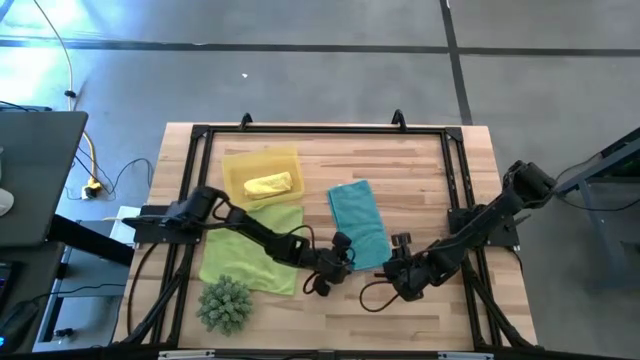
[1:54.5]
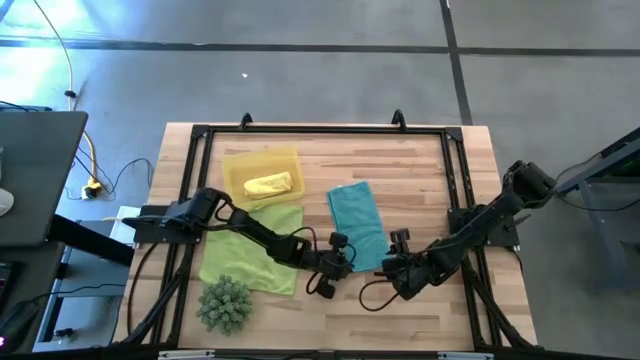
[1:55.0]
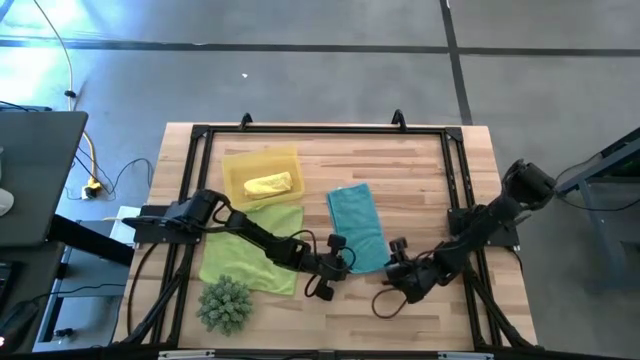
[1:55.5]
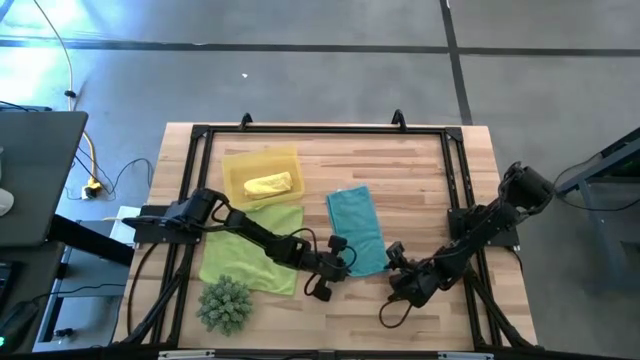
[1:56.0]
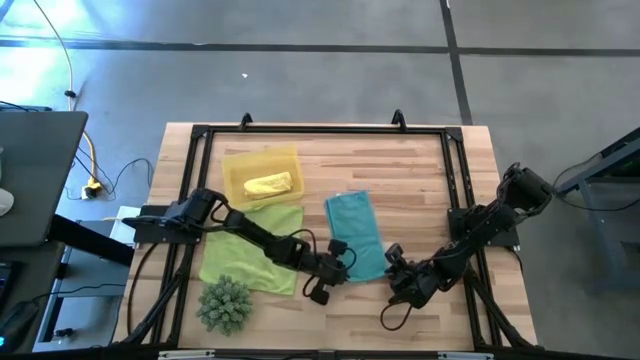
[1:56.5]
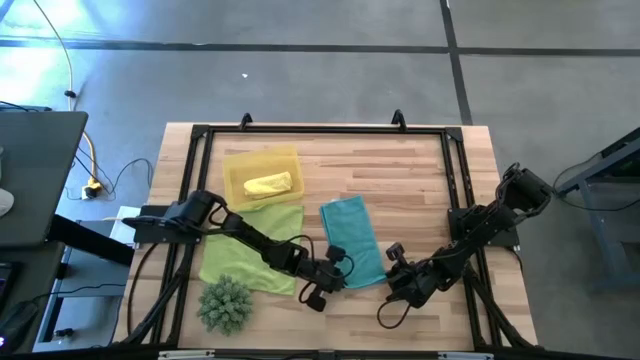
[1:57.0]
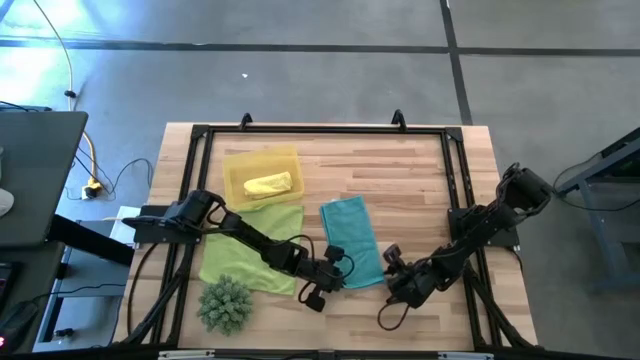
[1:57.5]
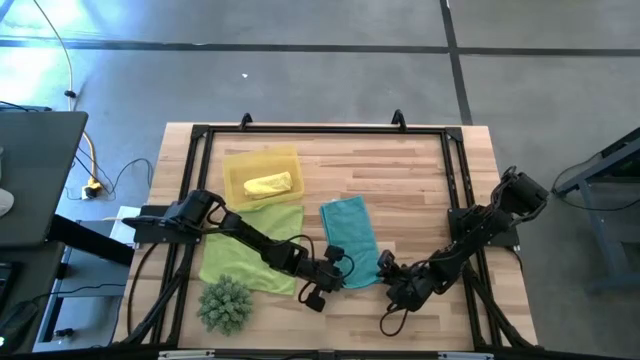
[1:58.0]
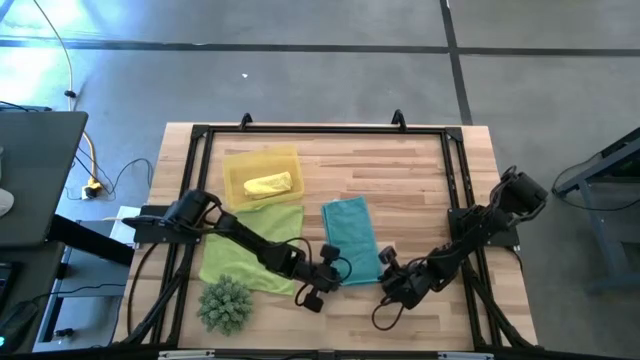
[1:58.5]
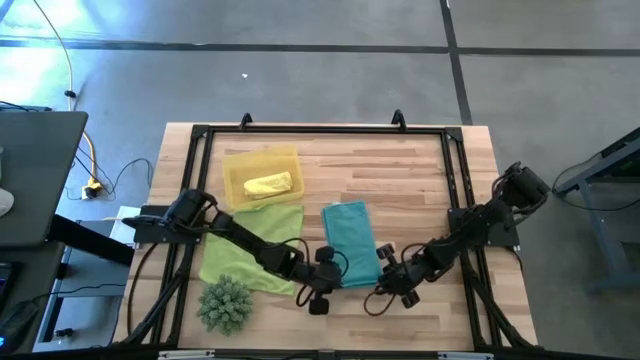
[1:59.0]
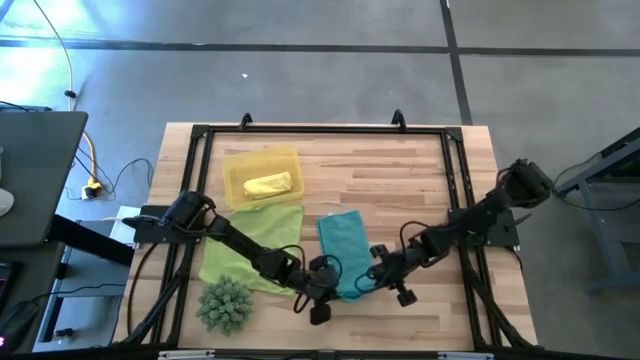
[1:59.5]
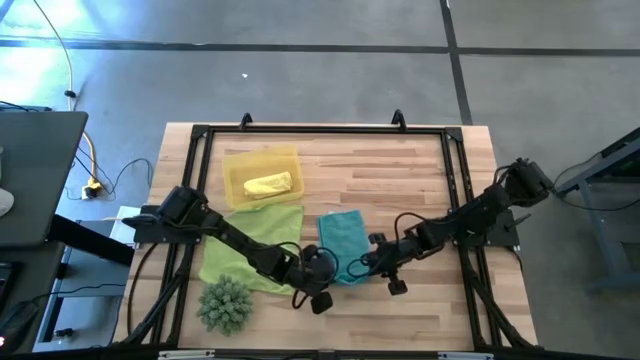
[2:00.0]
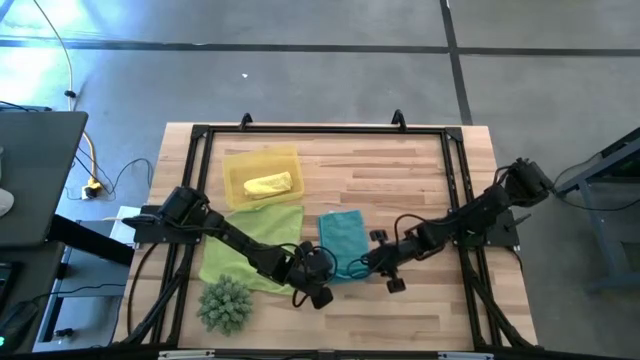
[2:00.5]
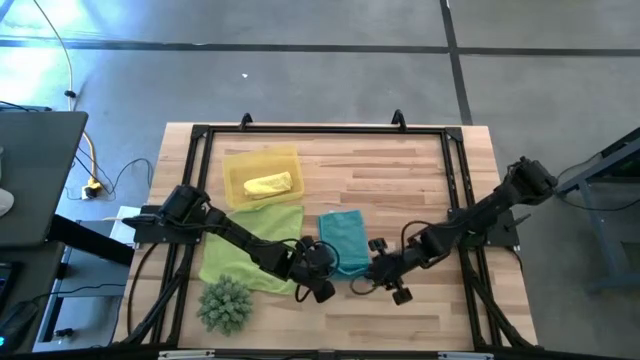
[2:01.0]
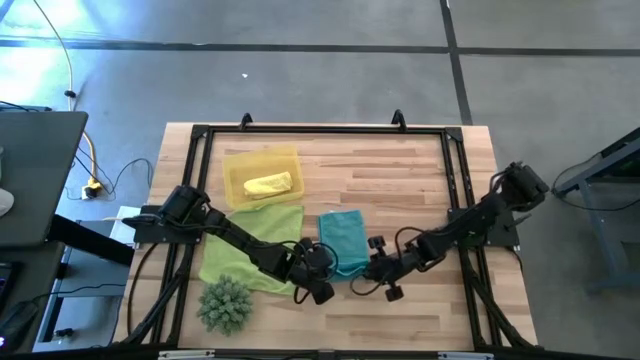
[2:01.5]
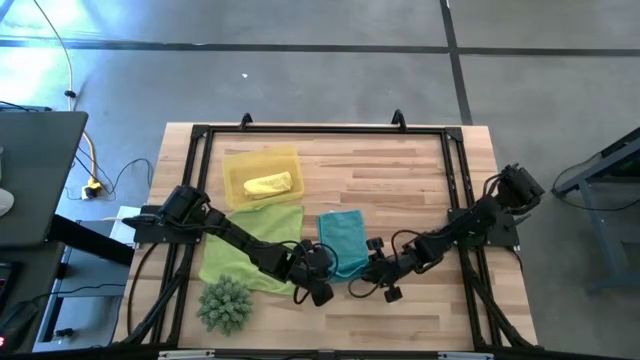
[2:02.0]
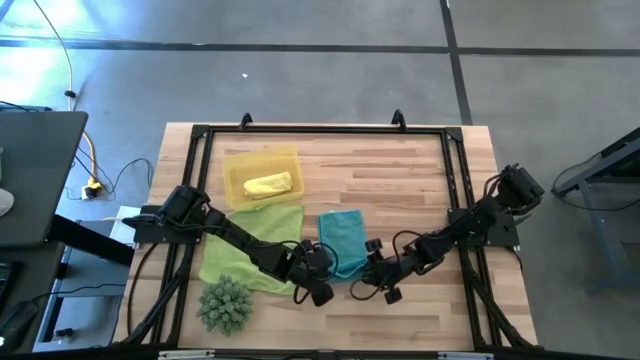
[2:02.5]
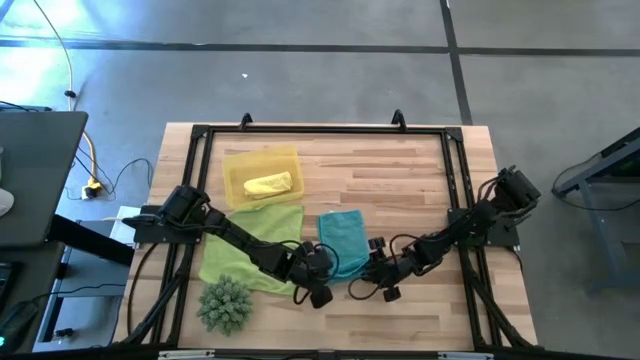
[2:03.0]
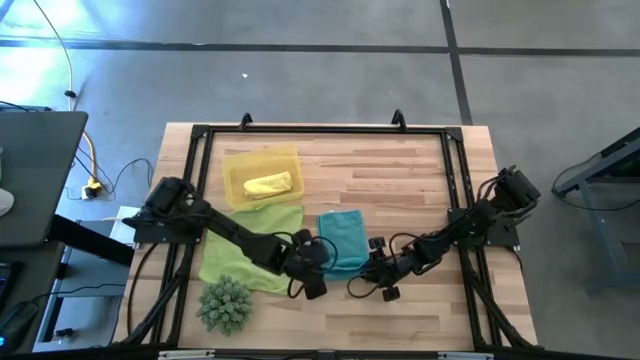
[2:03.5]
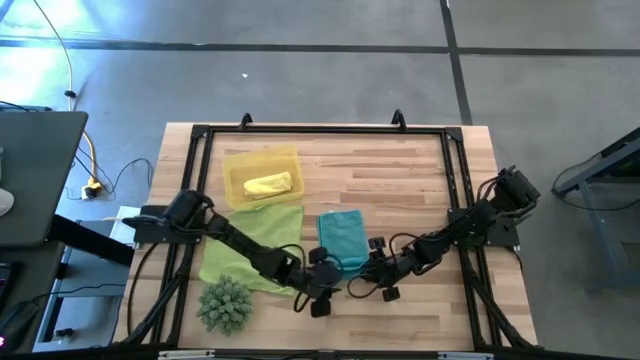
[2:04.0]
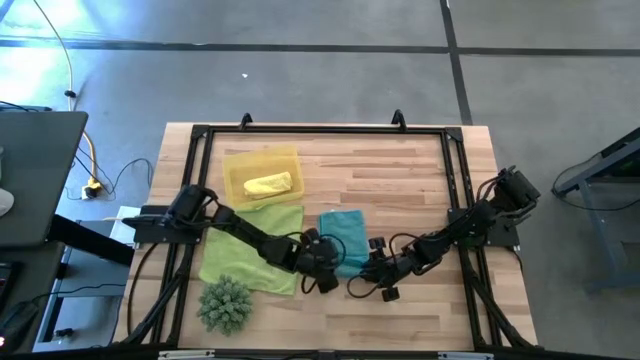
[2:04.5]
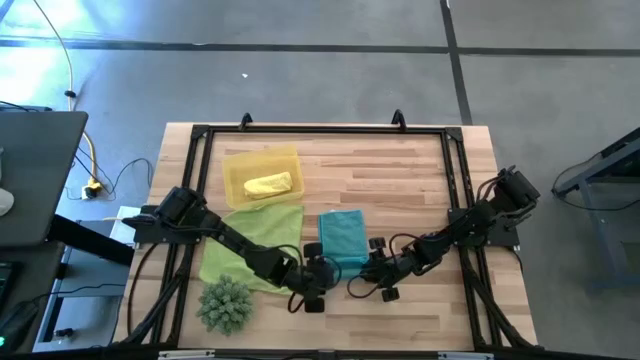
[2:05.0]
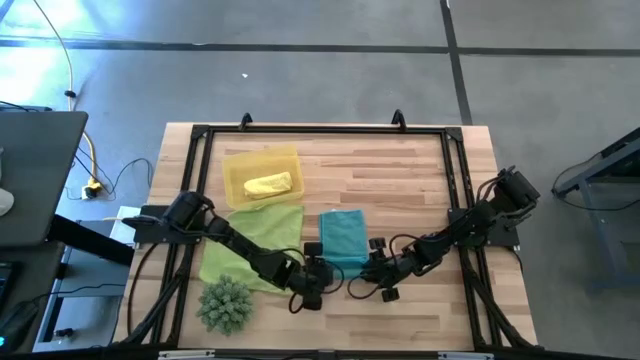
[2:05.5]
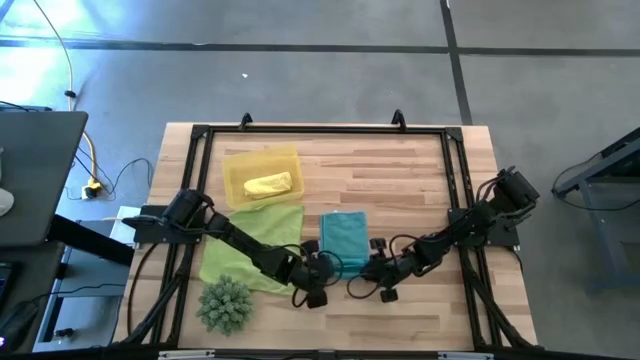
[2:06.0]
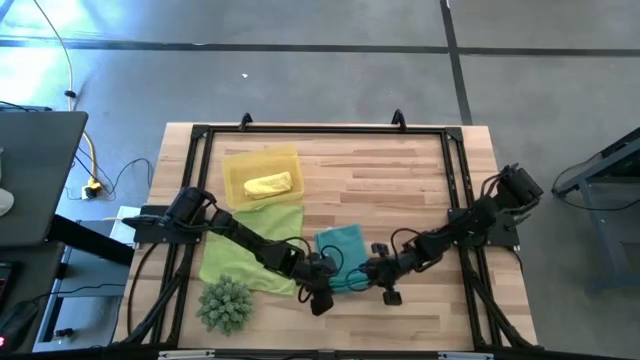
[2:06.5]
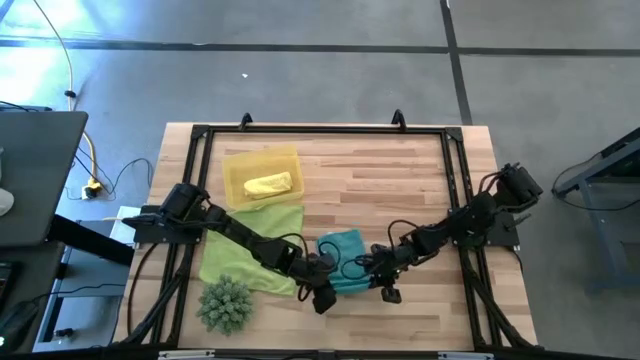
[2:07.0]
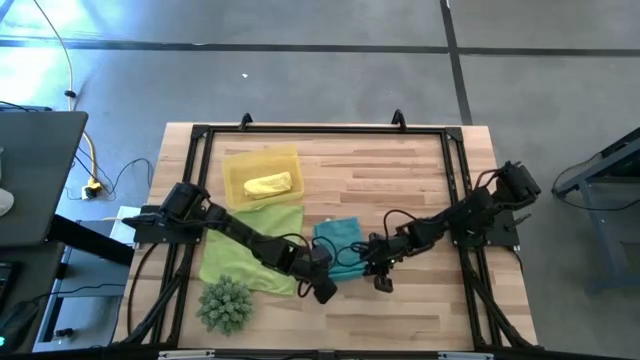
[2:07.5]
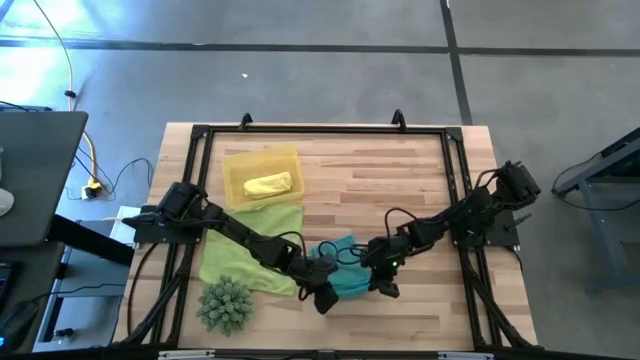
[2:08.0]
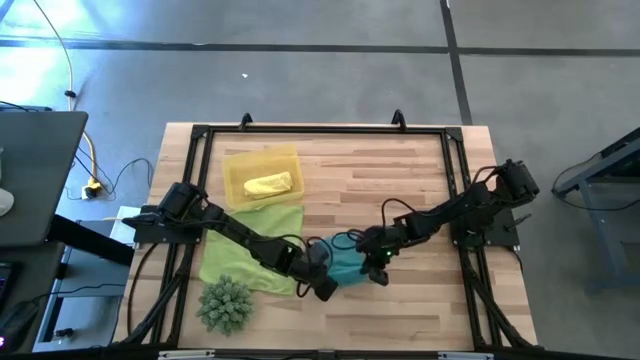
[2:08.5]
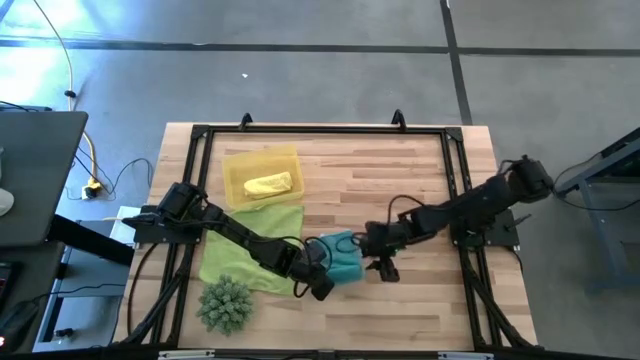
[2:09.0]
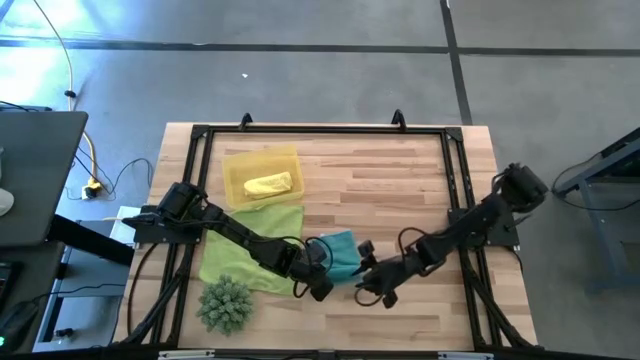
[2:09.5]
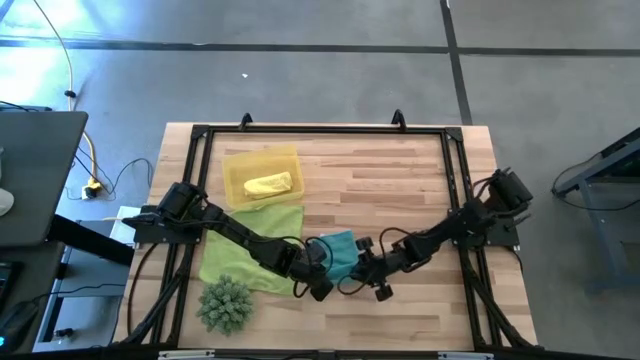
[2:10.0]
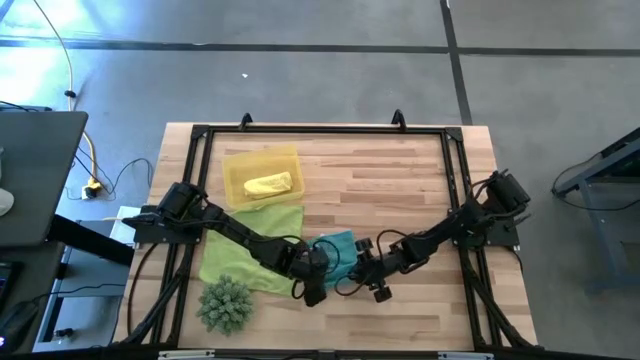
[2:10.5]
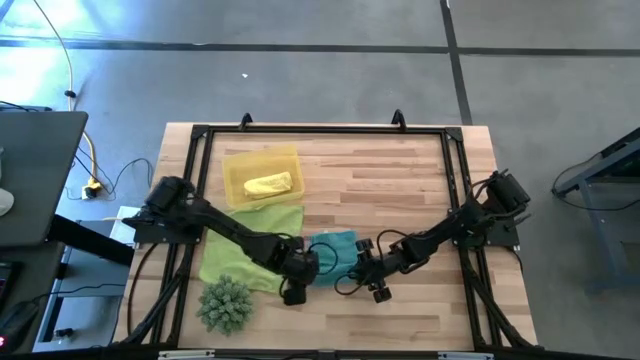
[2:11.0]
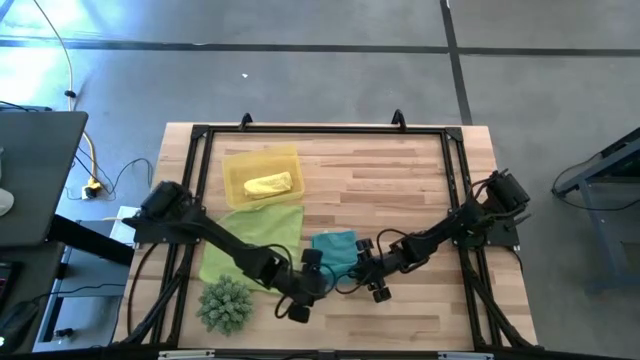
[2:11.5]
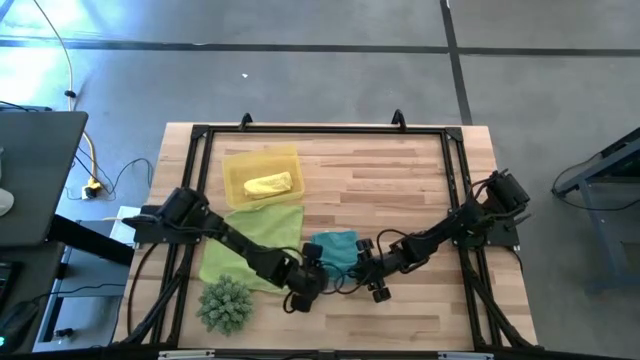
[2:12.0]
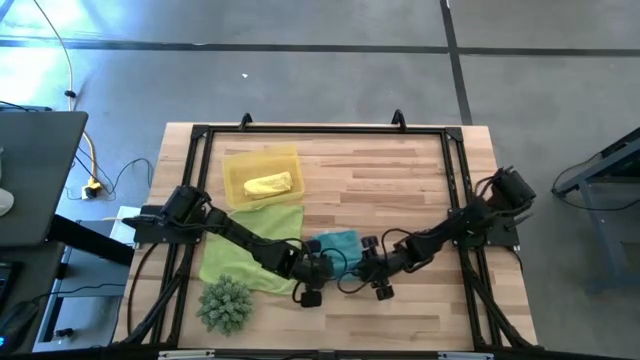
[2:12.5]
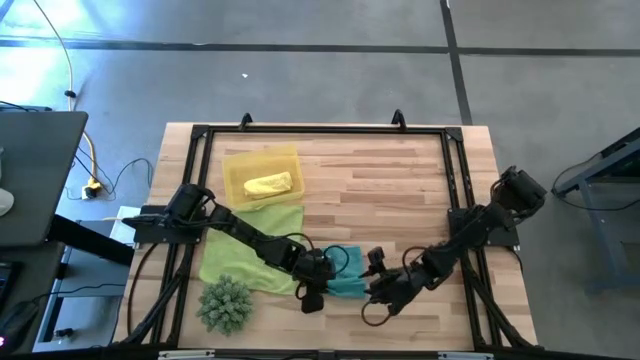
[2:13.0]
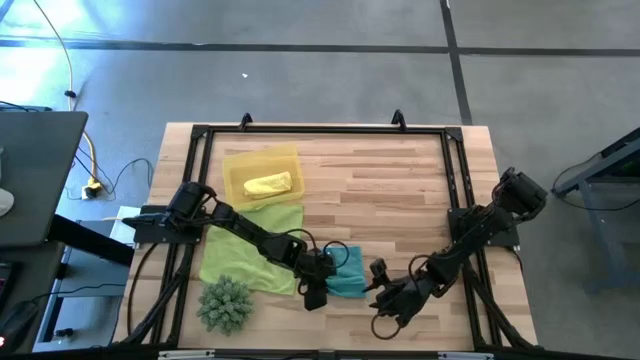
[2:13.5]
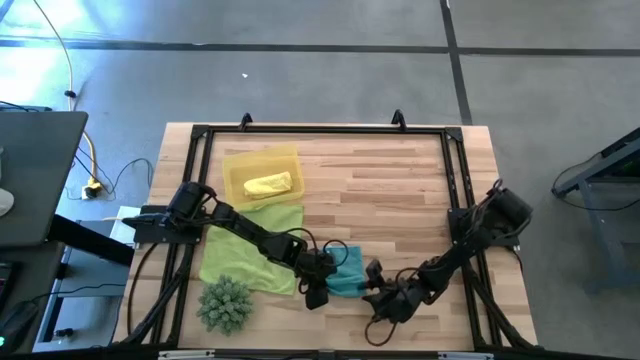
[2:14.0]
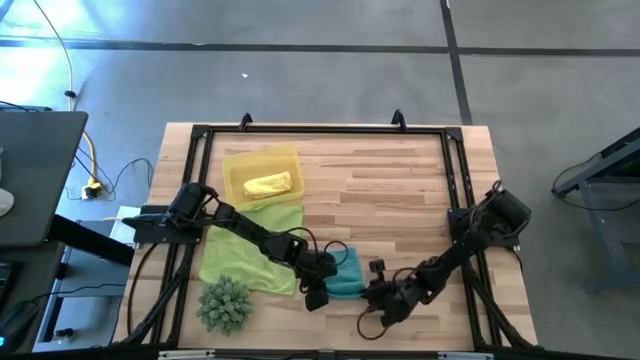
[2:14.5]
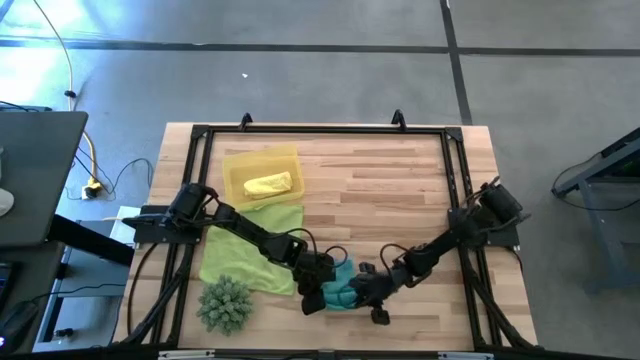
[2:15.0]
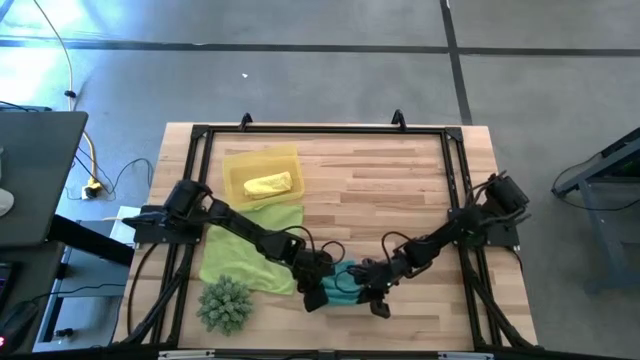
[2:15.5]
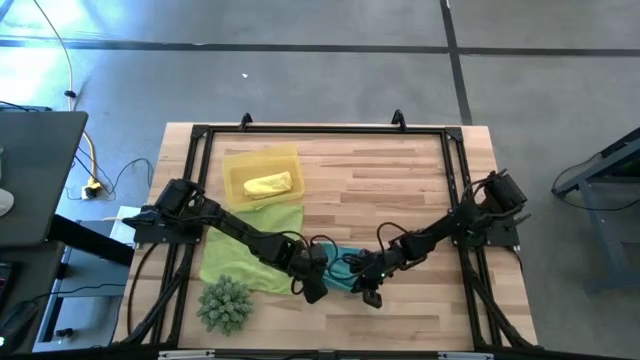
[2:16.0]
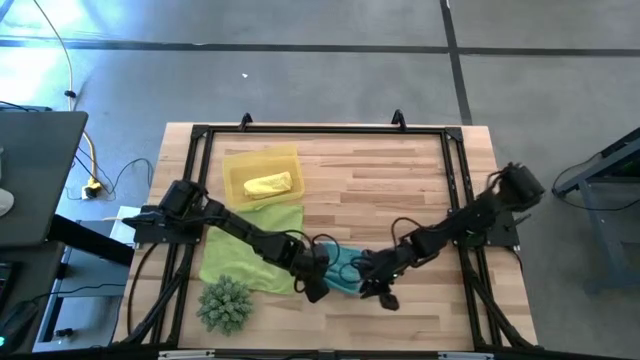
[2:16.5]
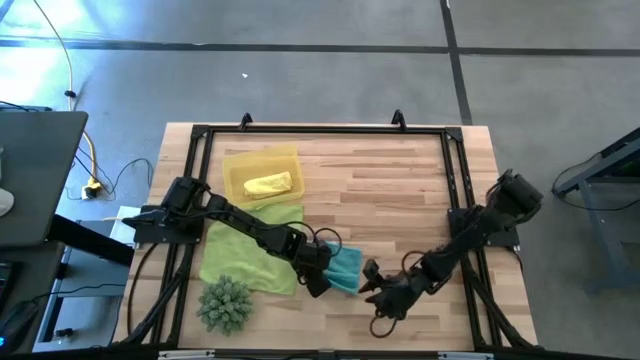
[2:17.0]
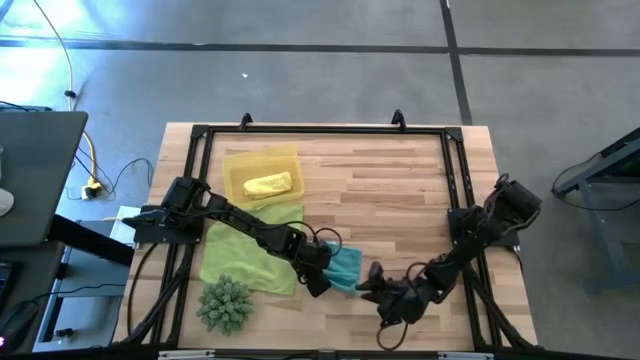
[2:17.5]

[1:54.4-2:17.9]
Task: Roll microfiber towels into tight, uniform cylinder then place into a basket
Roll the blue microfiber towel
